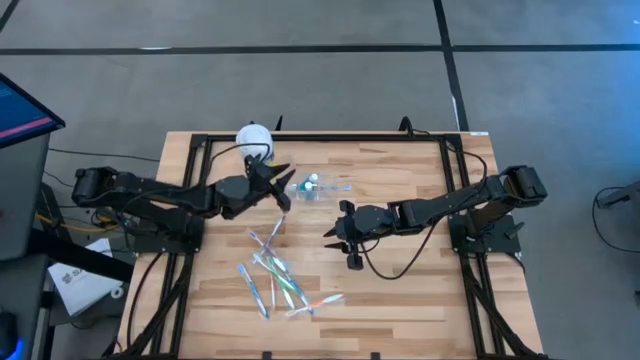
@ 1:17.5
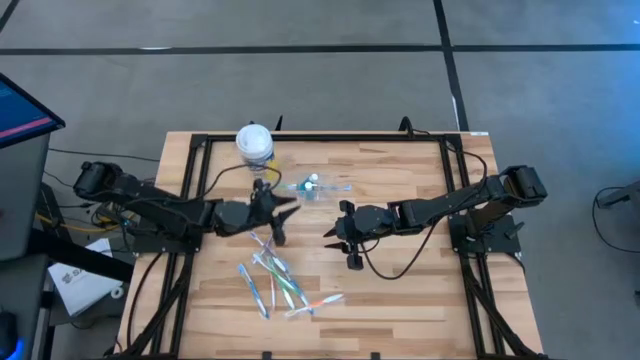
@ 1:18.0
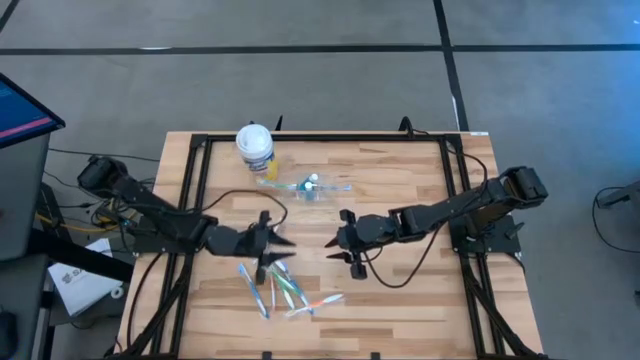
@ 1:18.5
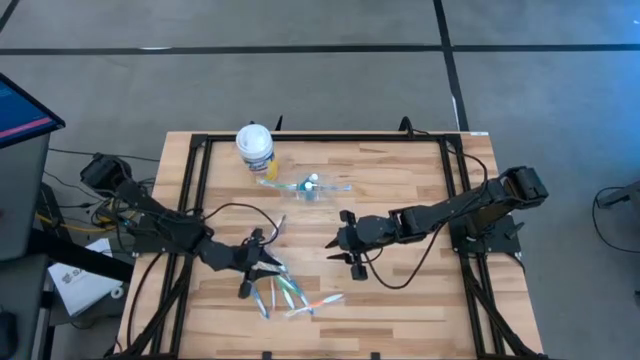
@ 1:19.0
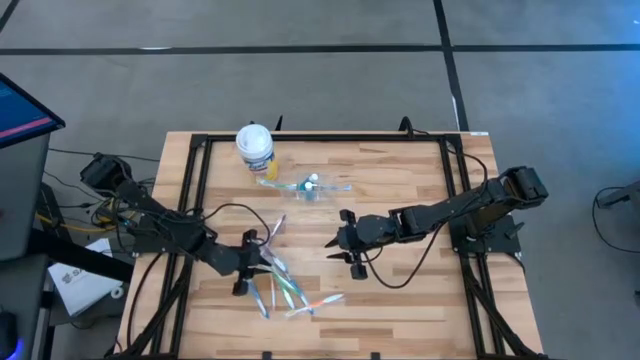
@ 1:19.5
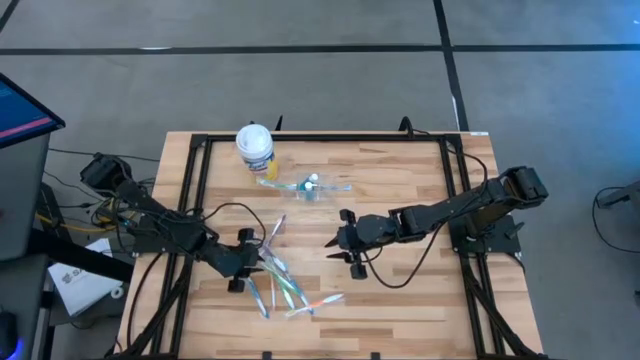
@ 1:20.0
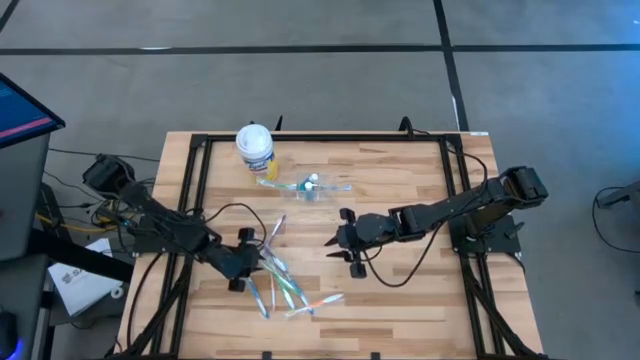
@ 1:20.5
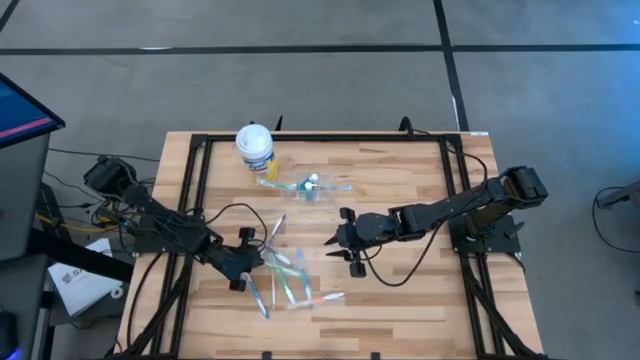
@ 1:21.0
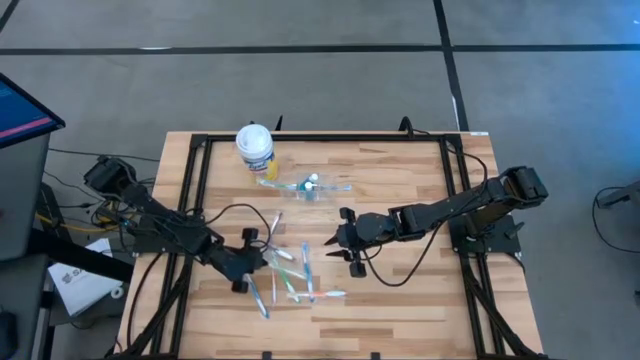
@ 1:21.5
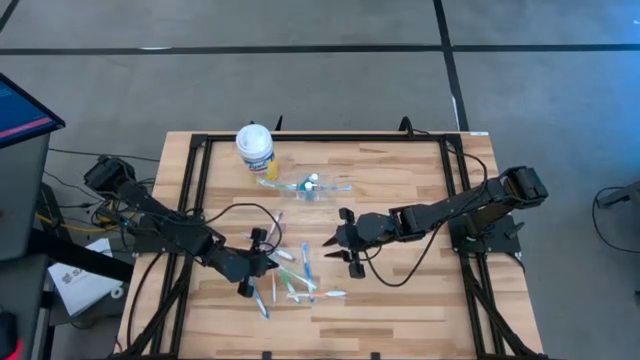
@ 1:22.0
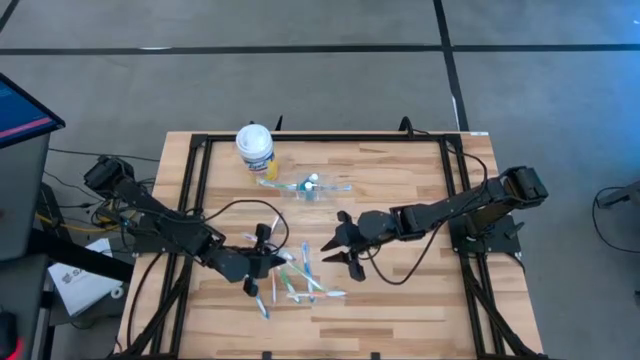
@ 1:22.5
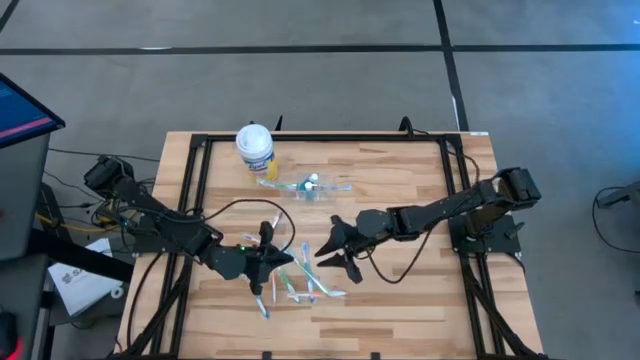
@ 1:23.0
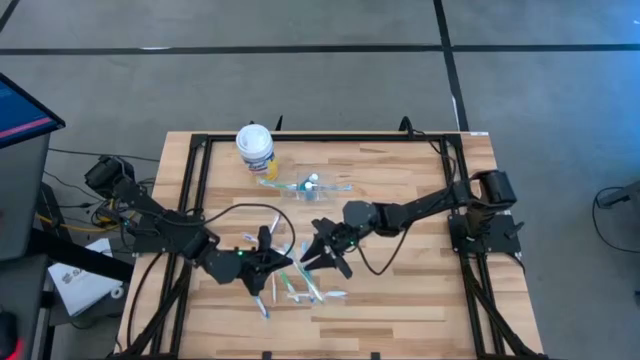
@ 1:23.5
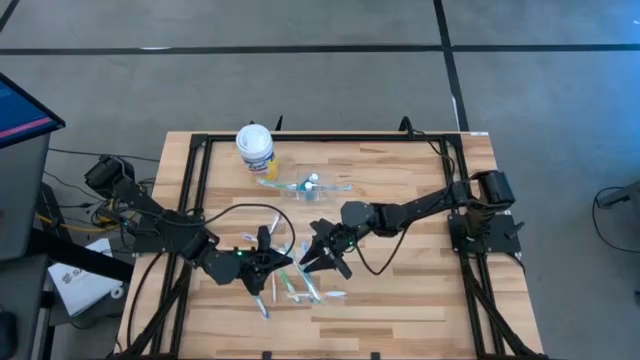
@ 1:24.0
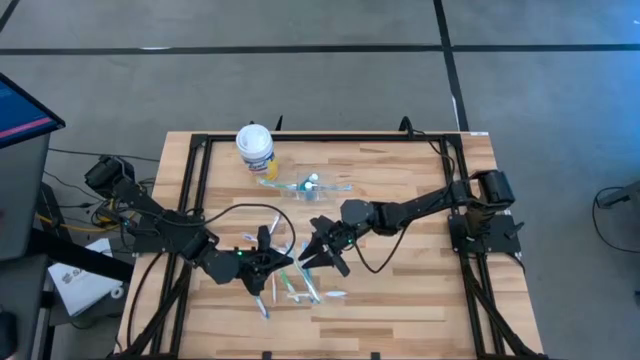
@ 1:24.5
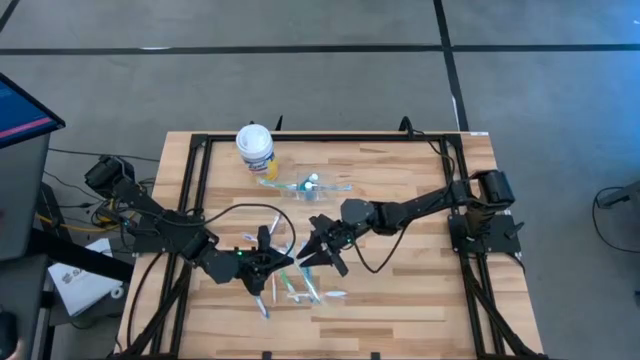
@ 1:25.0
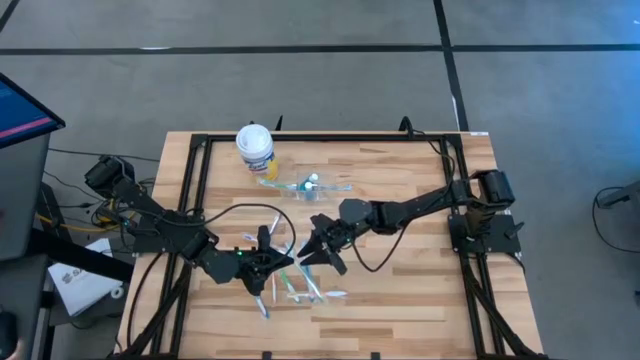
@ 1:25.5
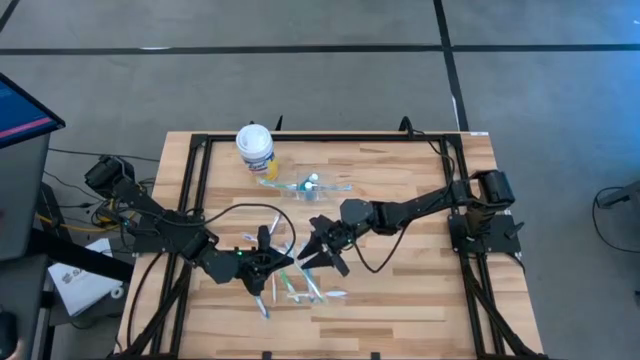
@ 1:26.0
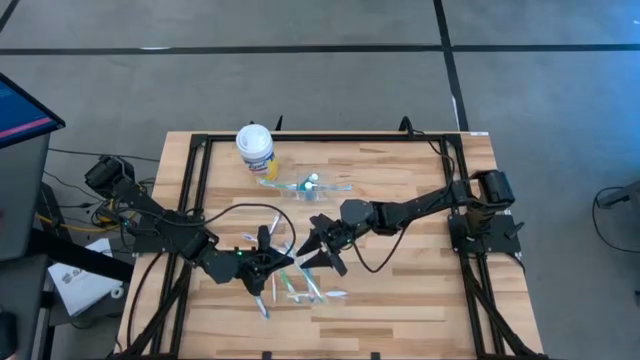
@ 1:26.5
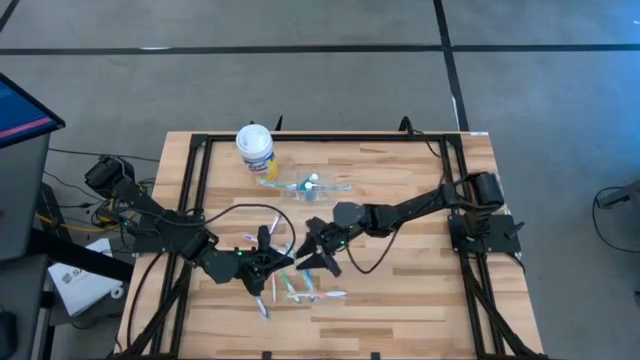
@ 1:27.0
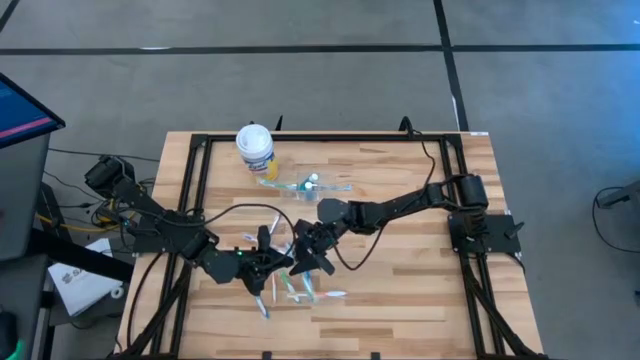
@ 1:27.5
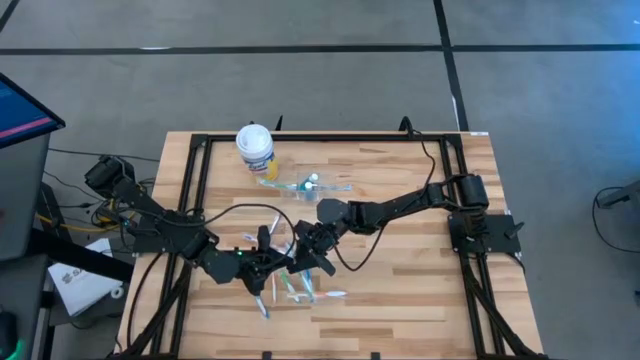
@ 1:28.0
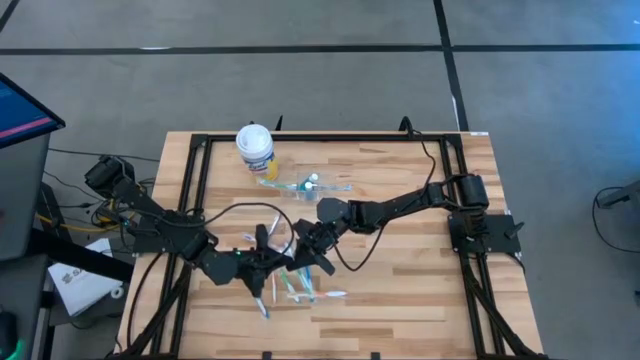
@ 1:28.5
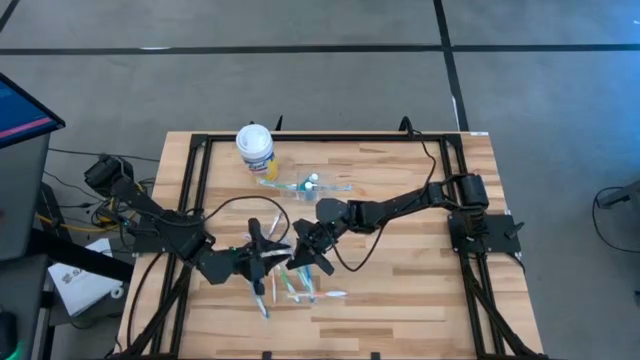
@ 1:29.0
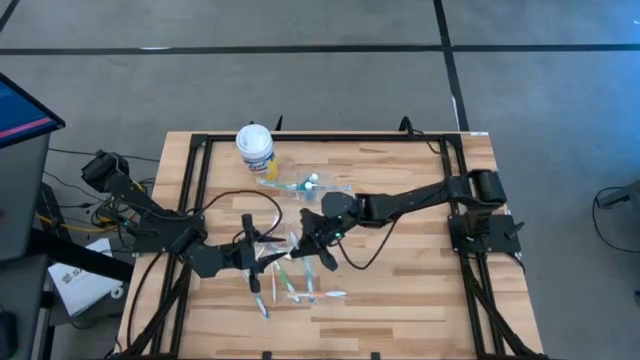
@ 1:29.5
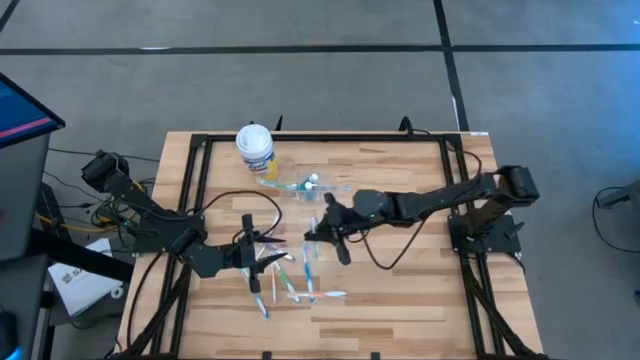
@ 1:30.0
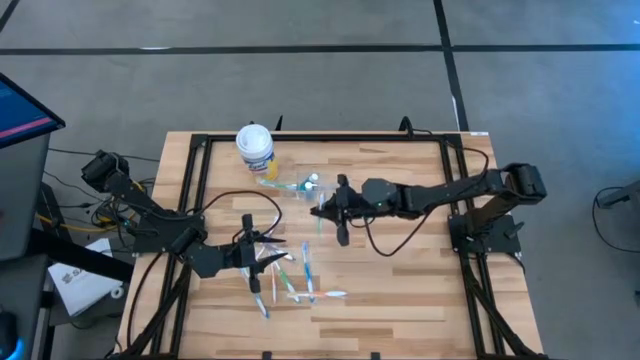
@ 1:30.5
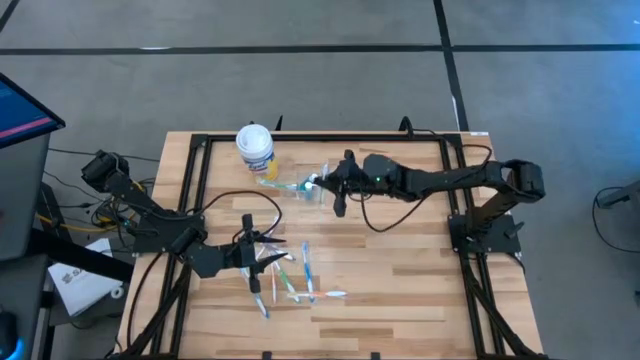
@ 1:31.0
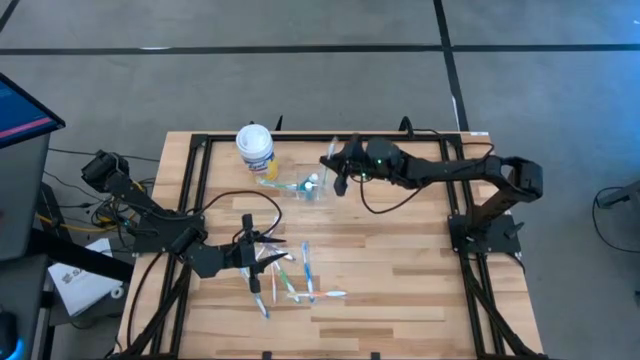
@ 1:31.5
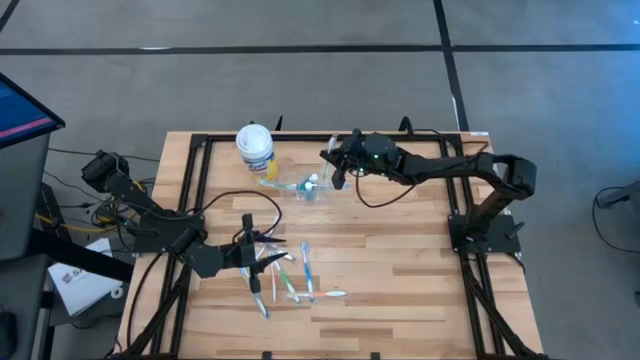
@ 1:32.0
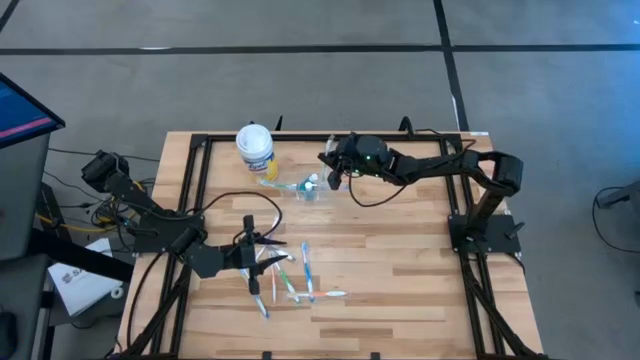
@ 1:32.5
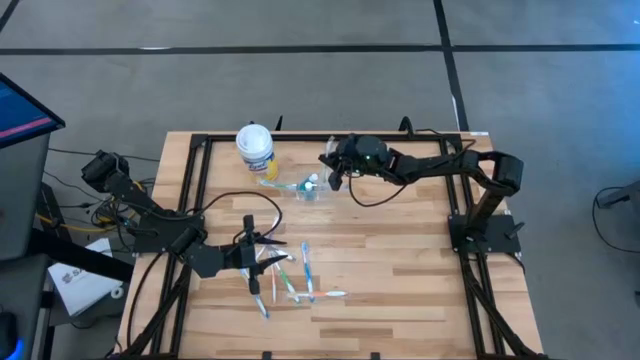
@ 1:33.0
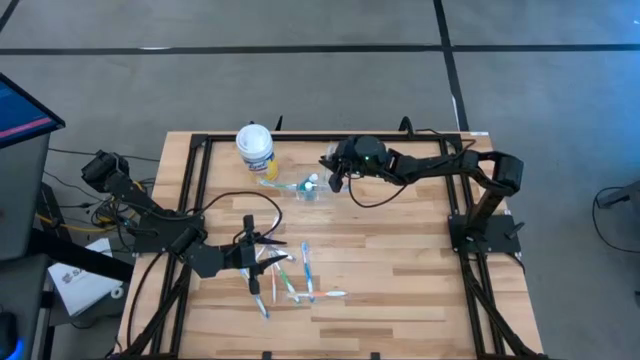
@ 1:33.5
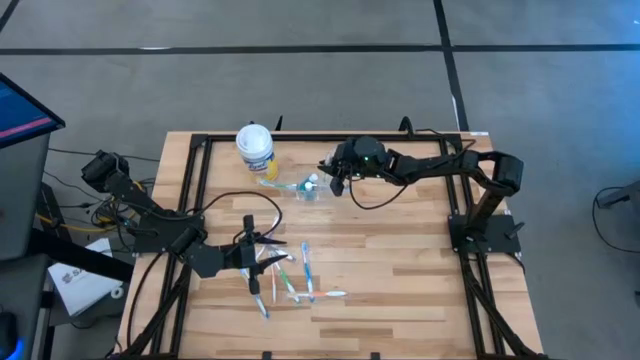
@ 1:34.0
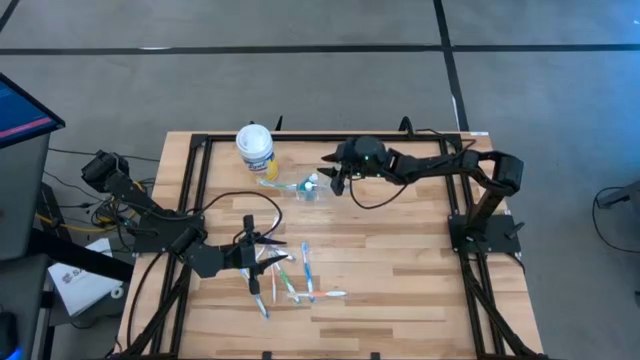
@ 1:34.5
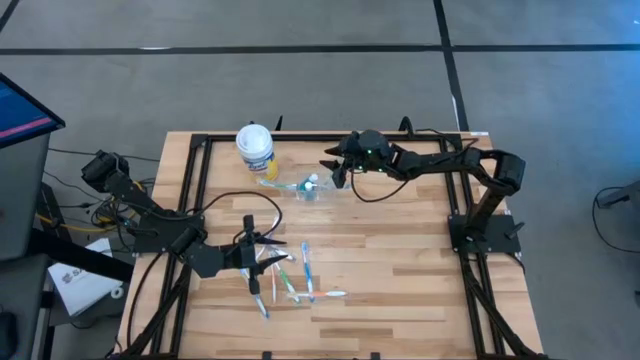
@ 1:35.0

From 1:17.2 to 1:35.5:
Task: Pick & Place toothbrushing station
Put the green toothbrush into the transparent organizer
